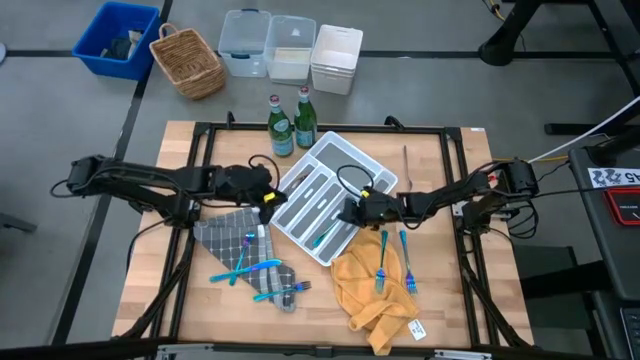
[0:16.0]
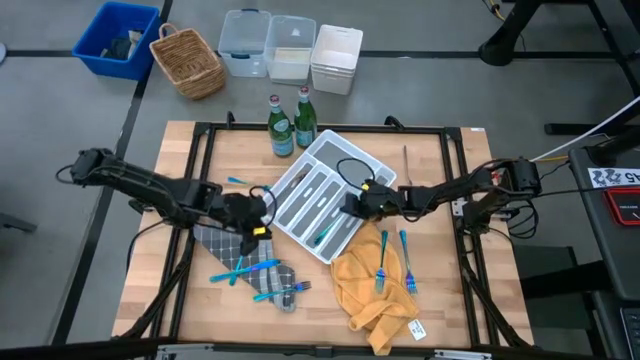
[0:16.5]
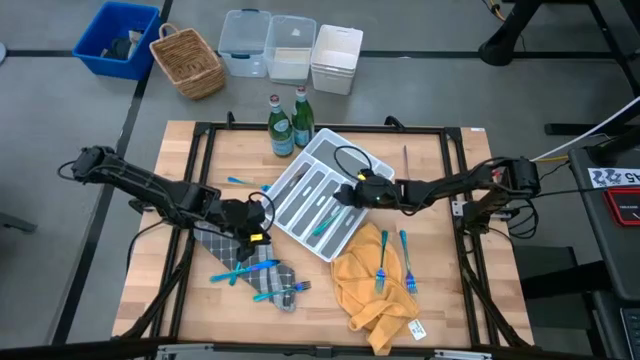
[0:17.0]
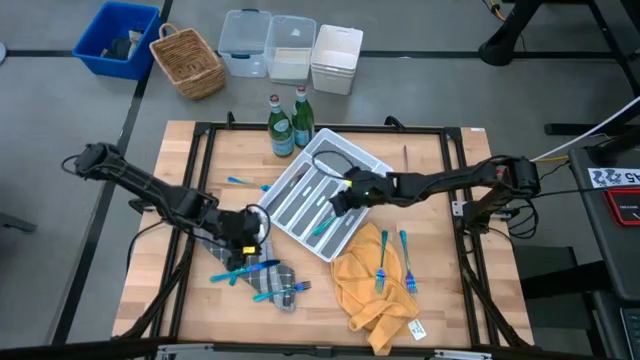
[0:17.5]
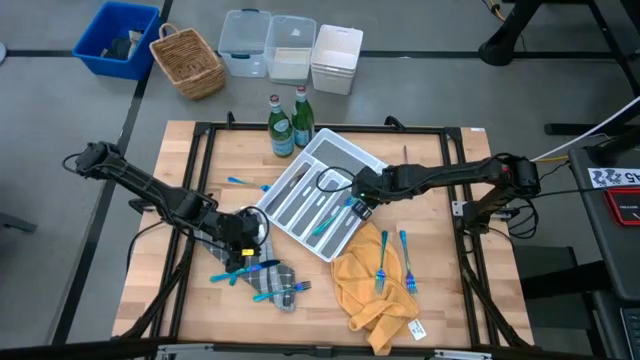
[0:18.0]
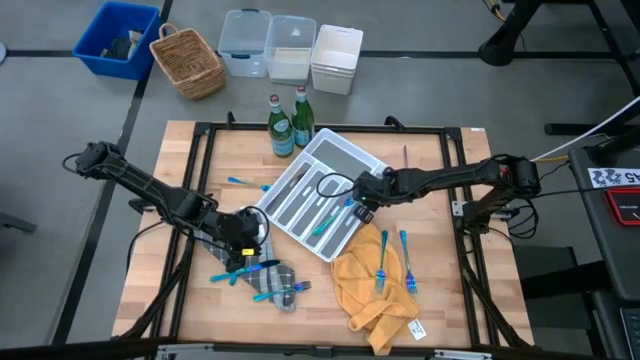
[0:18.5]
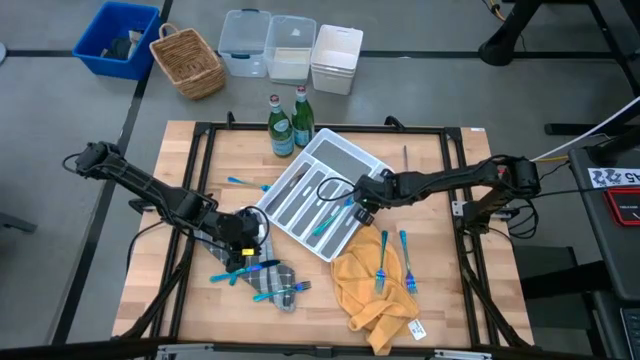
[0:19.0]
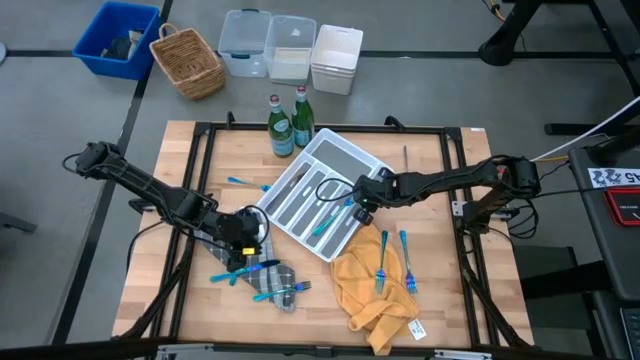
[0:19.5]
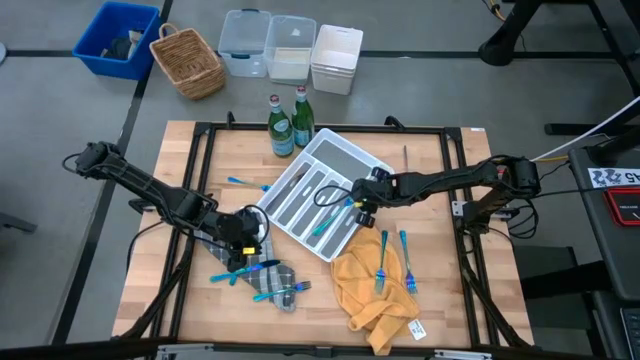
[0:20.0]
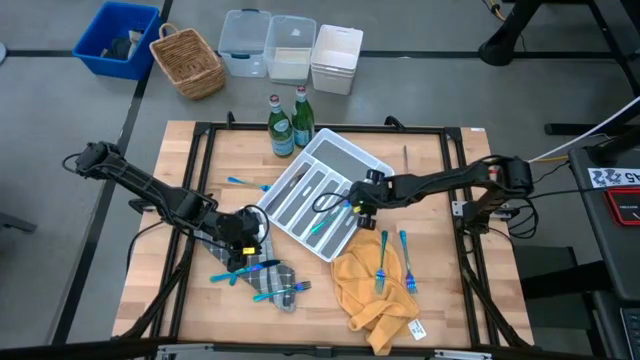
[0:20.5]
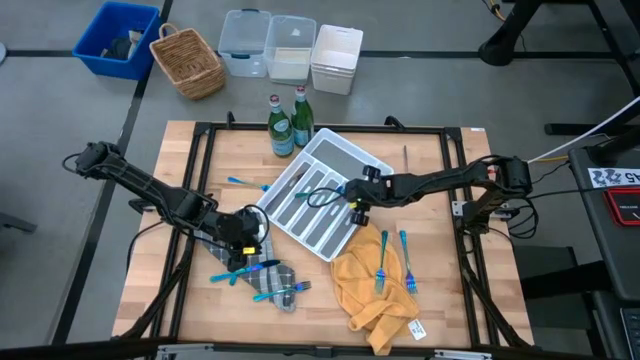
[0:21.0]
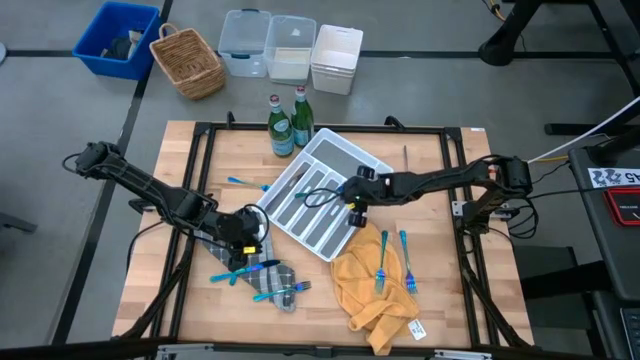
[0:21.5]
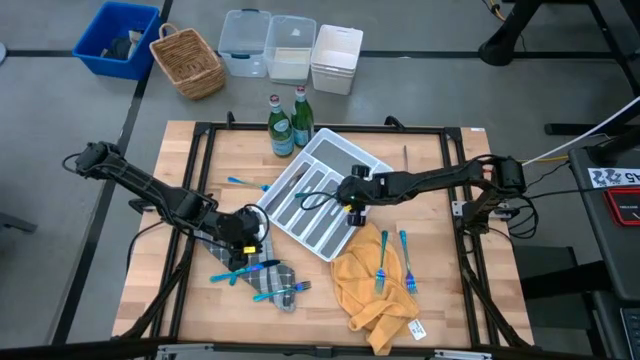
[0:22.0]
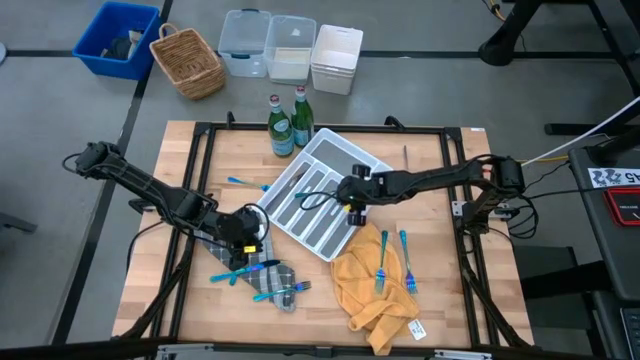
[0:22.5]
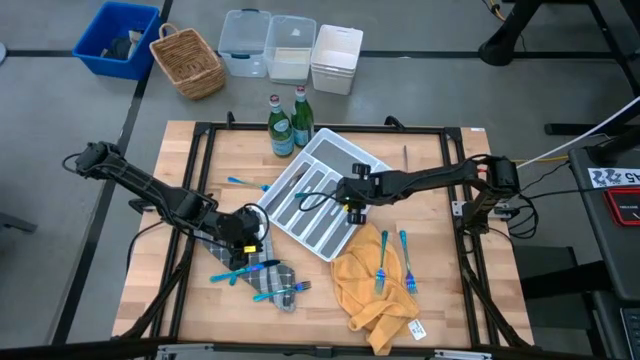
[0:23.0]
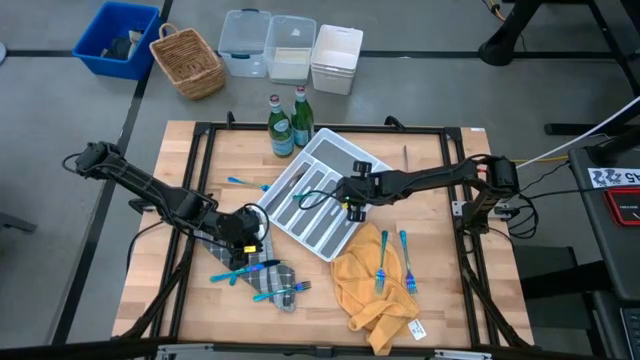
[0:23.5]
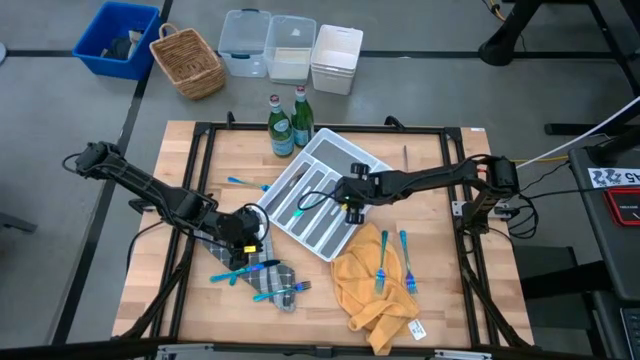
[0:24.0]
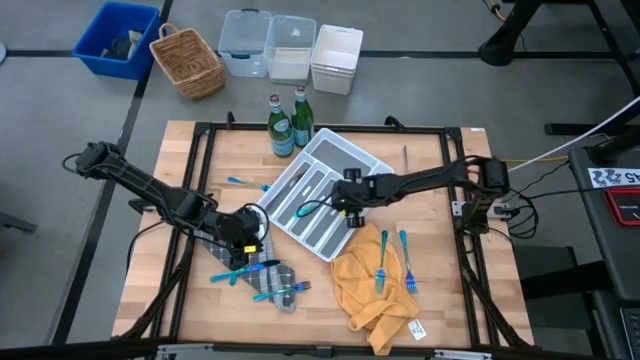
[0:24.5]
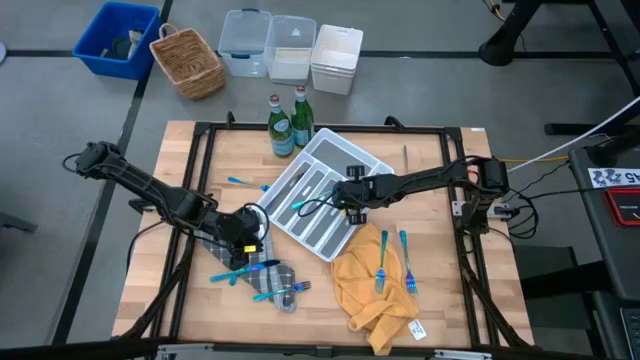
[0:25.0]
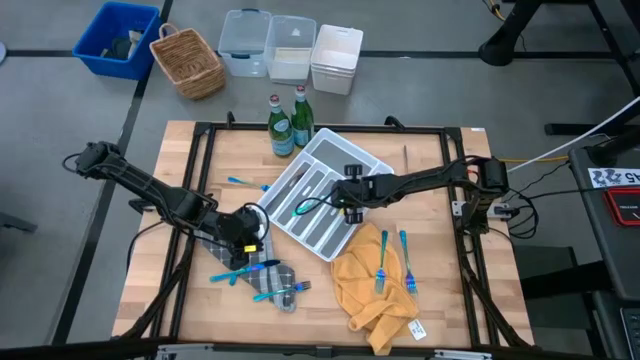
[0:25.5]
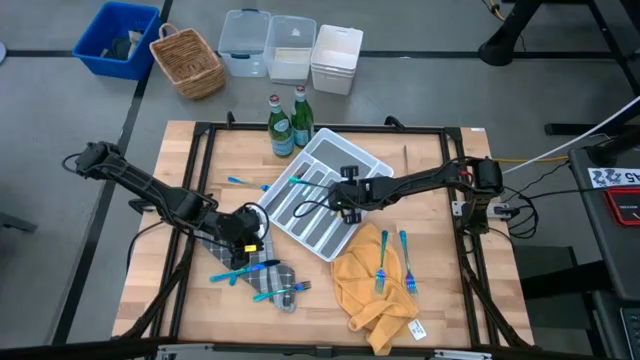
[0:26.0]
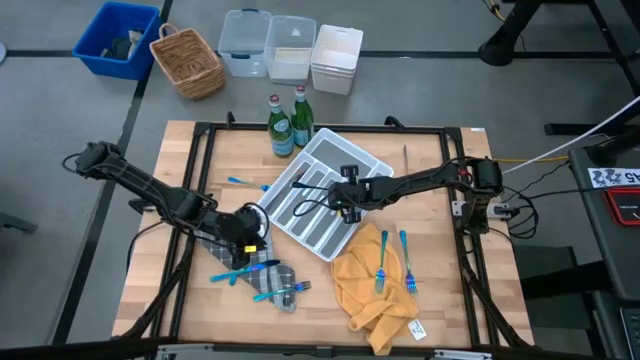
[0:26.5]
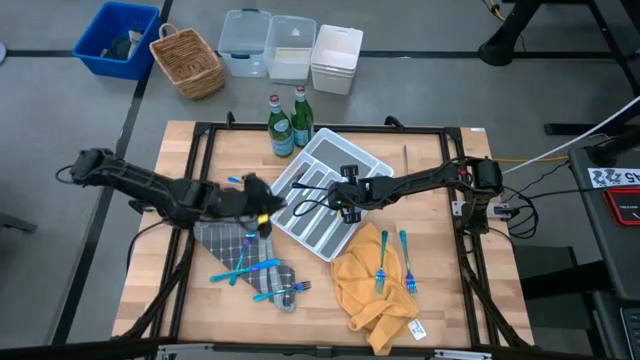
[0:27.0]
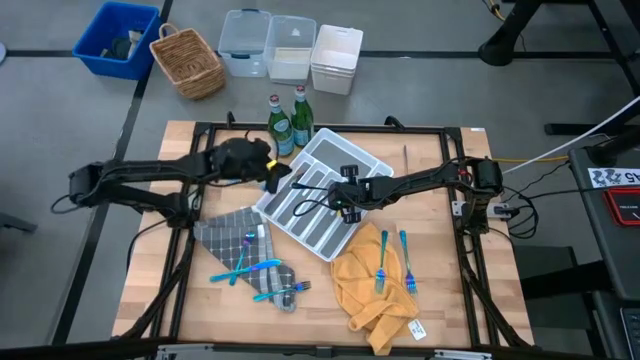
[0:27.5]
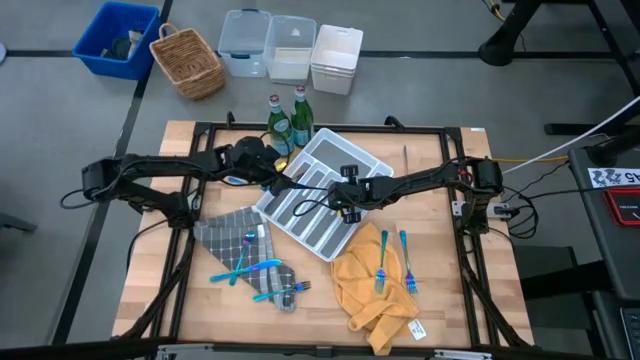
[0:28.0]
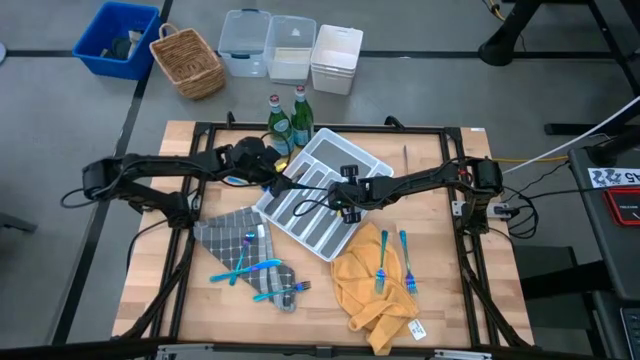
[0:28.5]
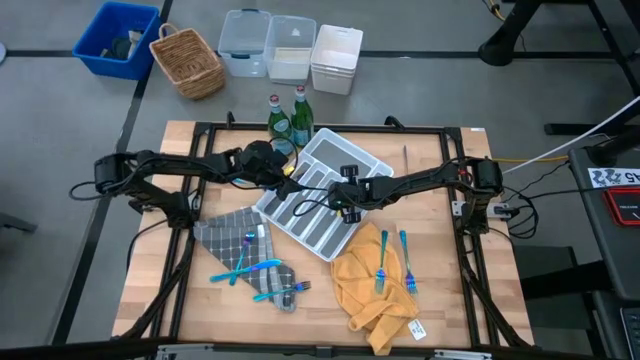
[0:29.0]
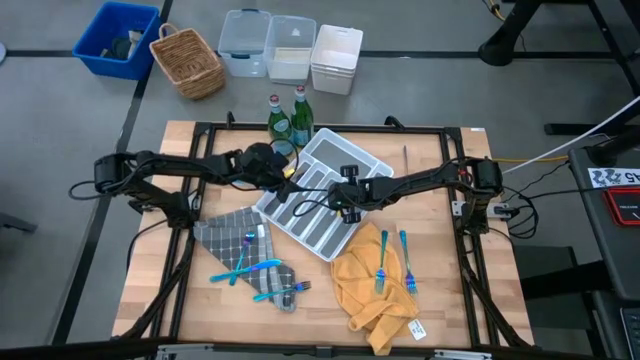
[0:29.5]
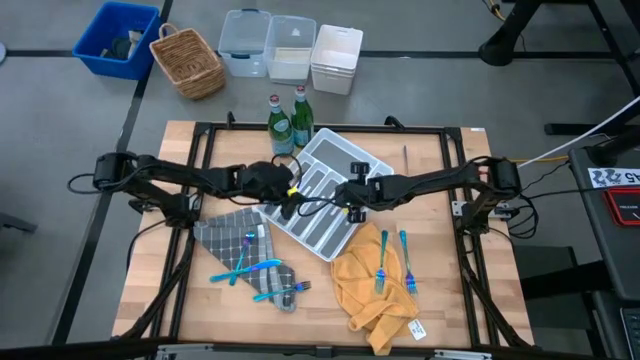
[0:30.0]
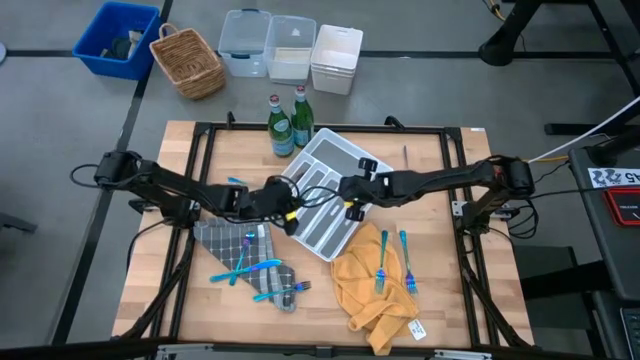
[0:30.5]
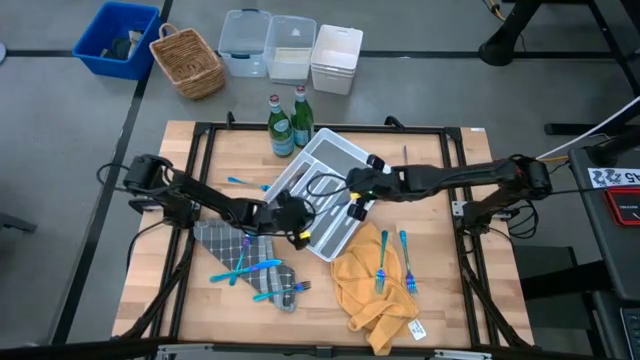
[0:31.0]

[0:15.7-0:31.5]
Put the blue fork into the cutlery tray

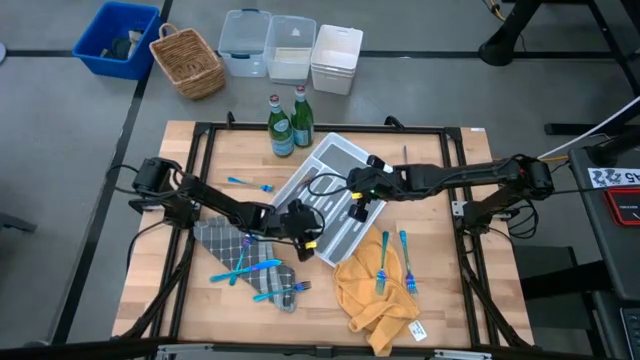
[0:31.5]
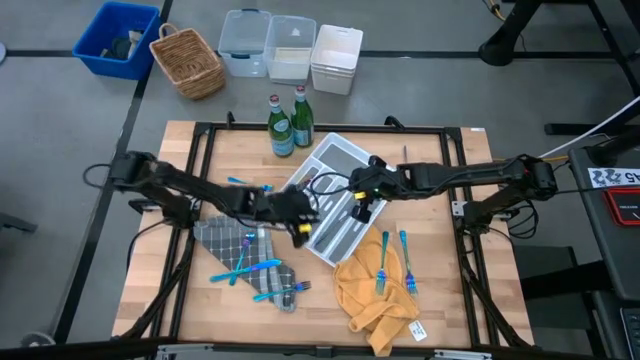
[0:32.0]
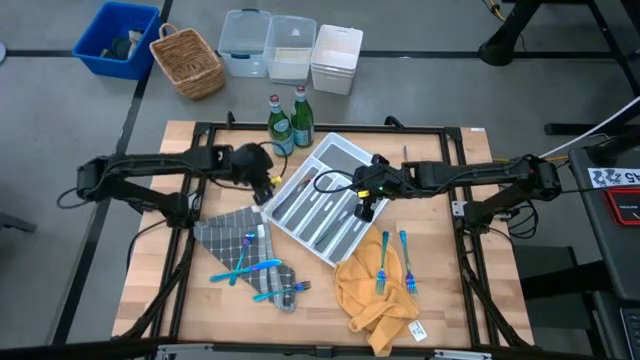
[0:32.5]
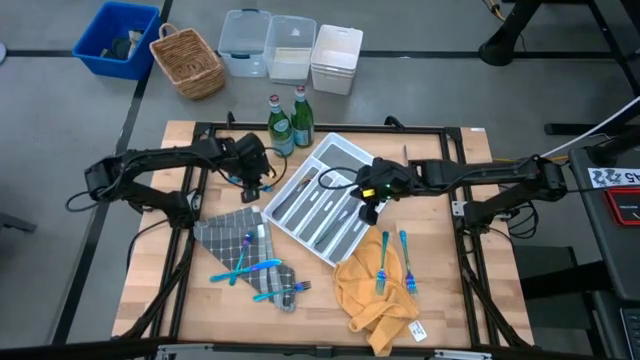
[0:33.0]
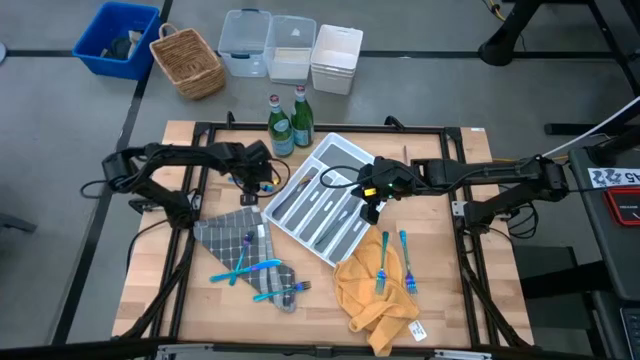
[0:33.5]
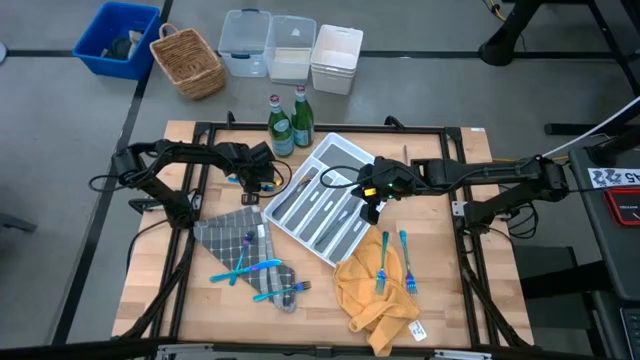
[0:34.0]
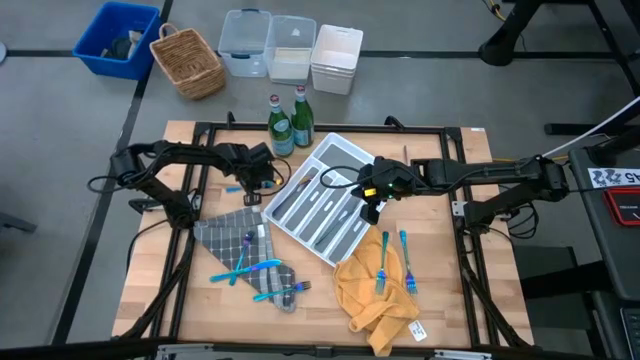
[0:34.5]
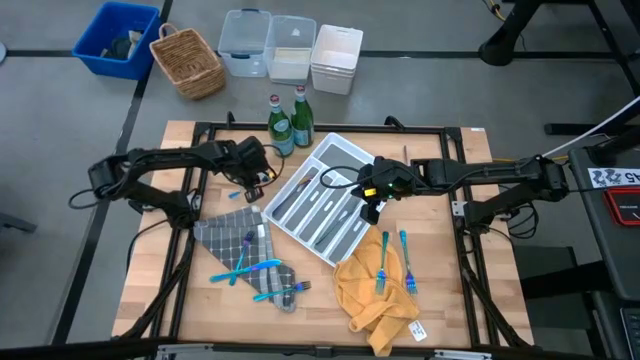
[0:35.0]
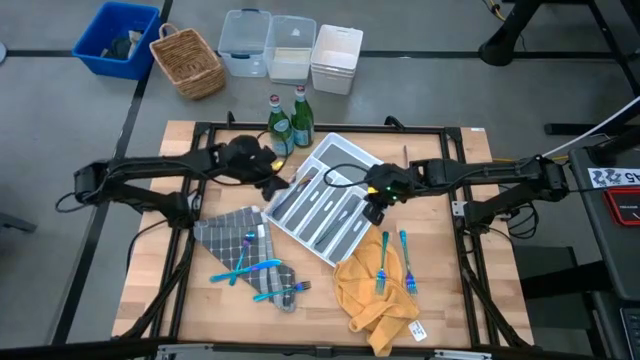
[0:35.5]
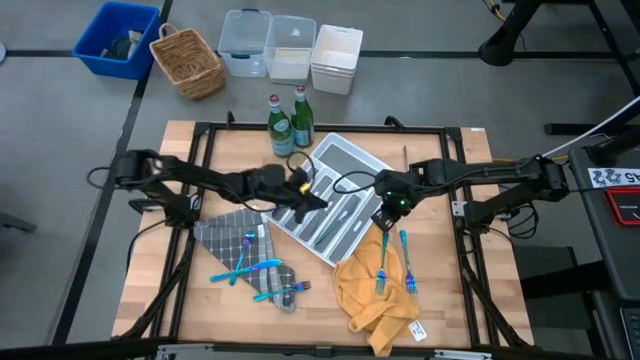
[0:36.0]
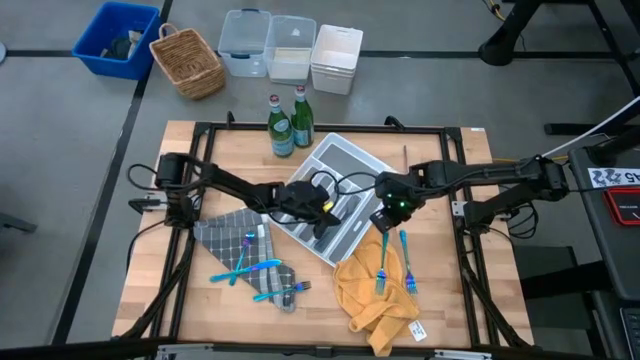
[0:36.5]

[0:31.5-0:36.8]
Put the blue fork into the cutlery tray
